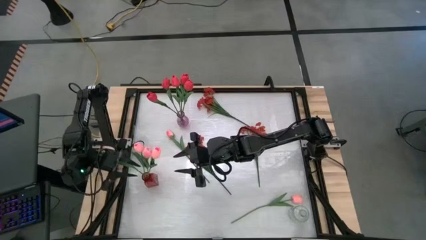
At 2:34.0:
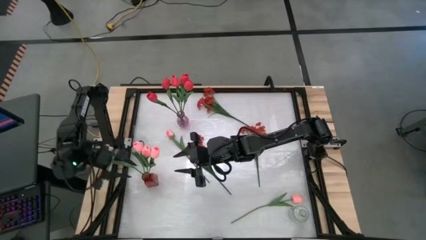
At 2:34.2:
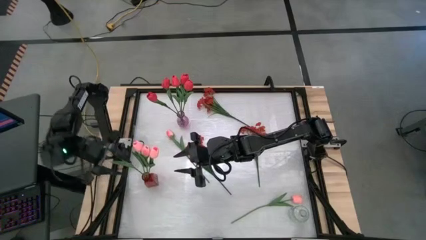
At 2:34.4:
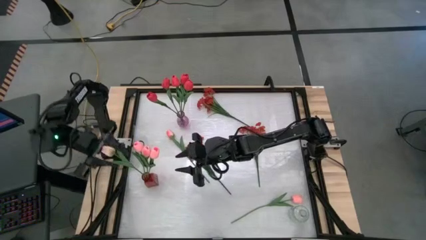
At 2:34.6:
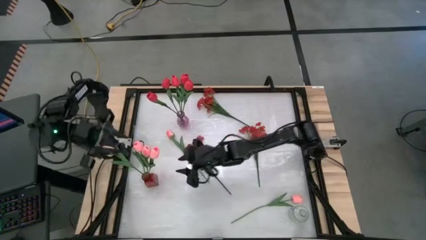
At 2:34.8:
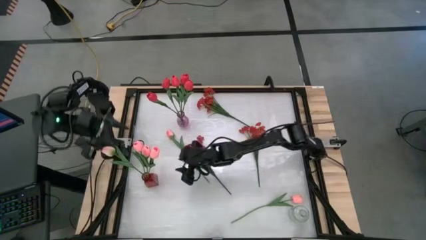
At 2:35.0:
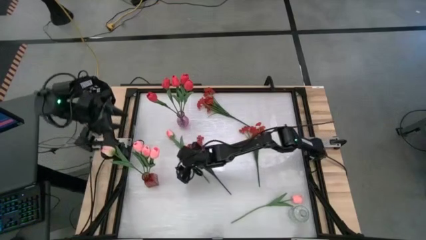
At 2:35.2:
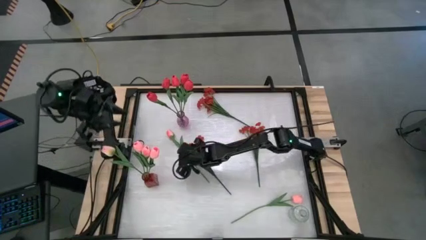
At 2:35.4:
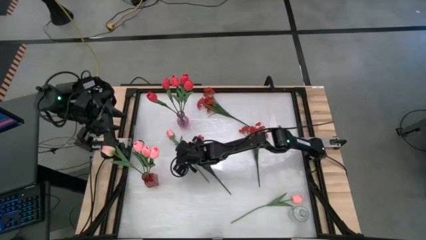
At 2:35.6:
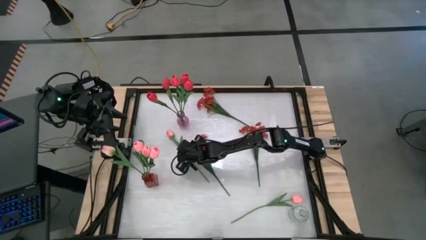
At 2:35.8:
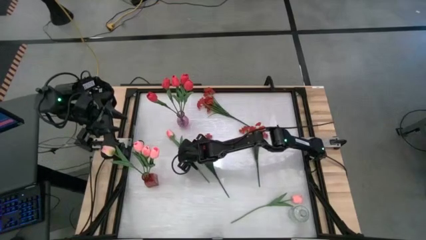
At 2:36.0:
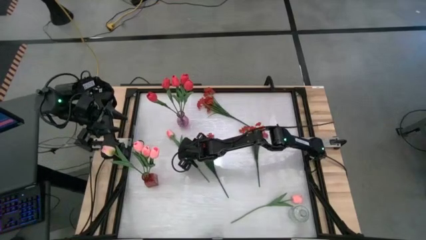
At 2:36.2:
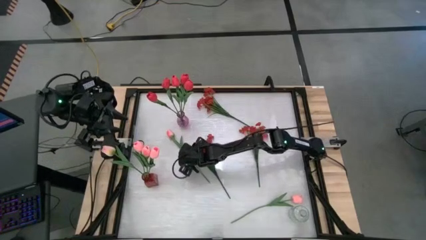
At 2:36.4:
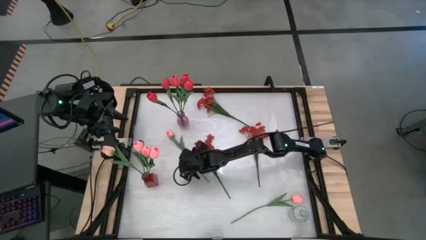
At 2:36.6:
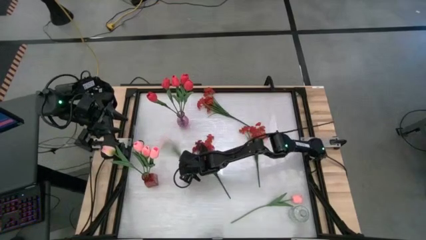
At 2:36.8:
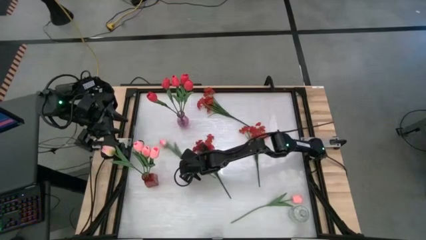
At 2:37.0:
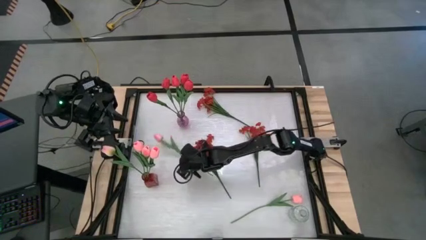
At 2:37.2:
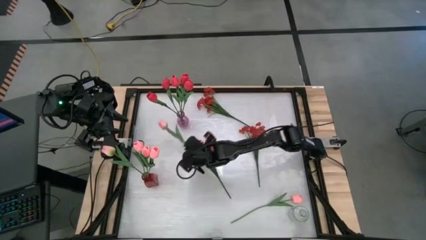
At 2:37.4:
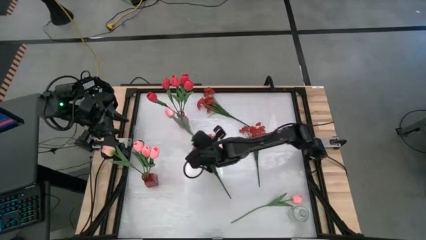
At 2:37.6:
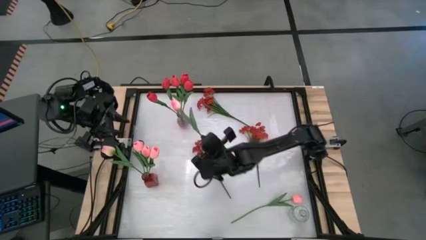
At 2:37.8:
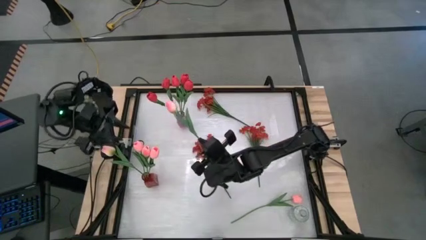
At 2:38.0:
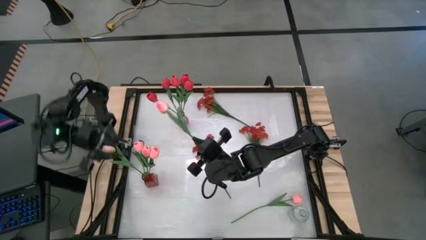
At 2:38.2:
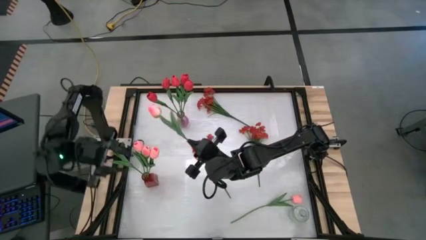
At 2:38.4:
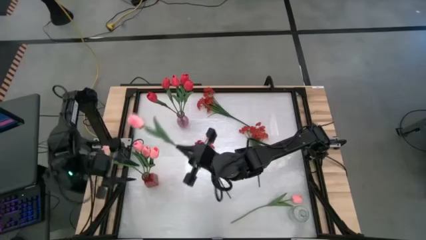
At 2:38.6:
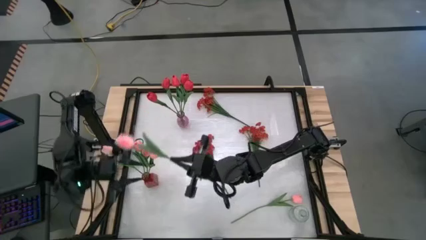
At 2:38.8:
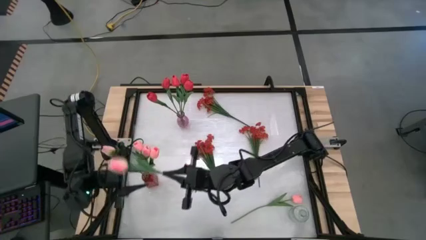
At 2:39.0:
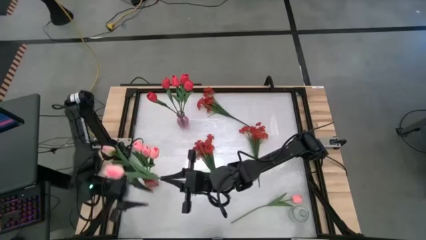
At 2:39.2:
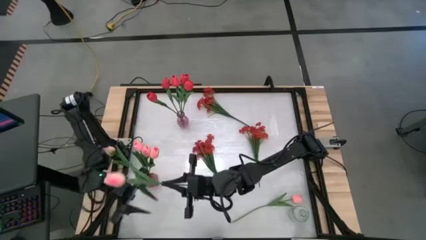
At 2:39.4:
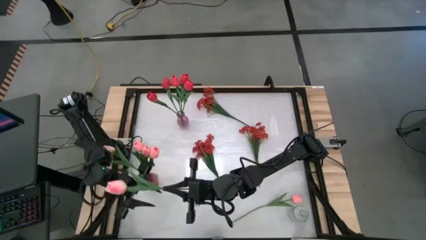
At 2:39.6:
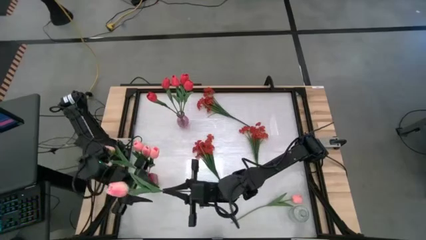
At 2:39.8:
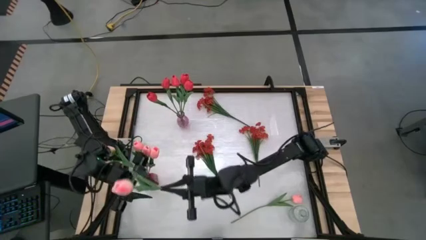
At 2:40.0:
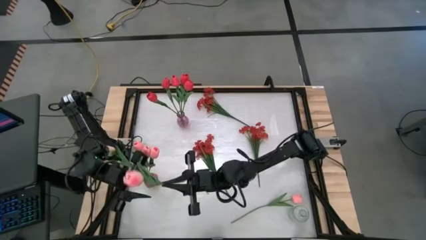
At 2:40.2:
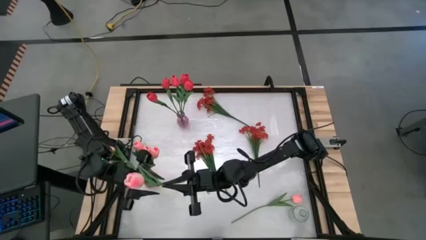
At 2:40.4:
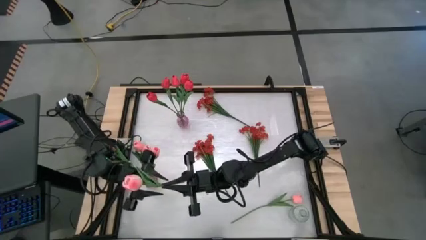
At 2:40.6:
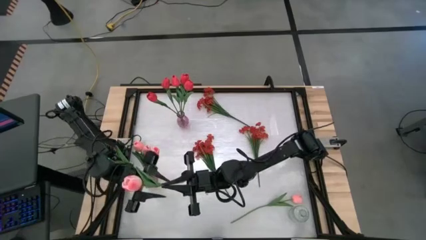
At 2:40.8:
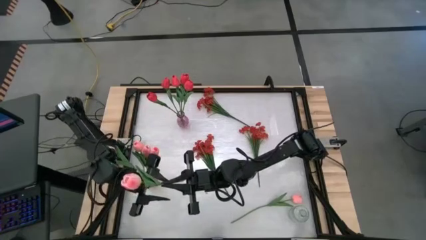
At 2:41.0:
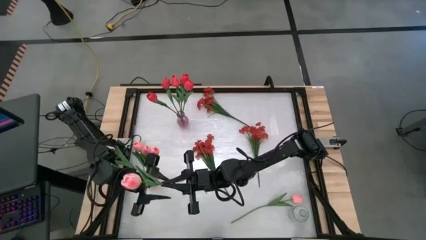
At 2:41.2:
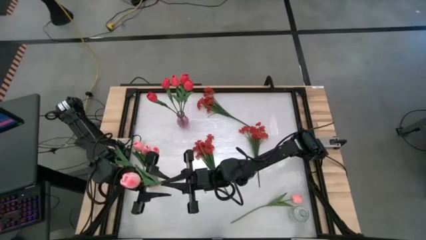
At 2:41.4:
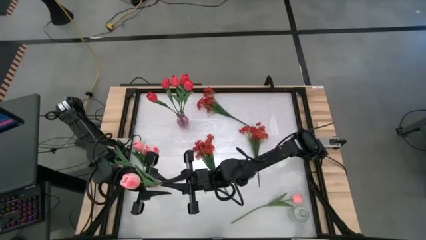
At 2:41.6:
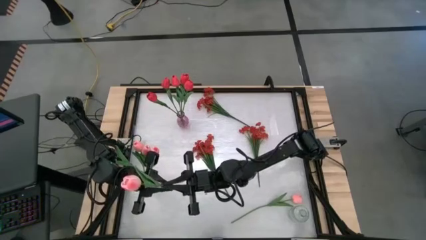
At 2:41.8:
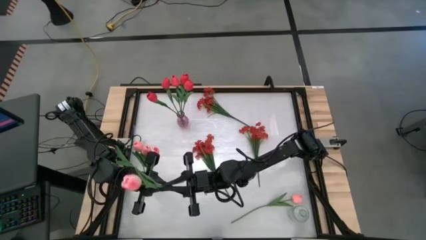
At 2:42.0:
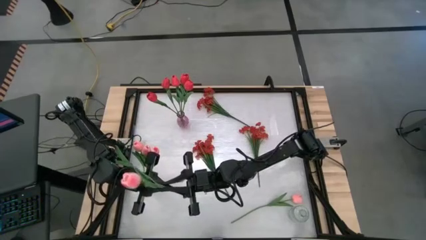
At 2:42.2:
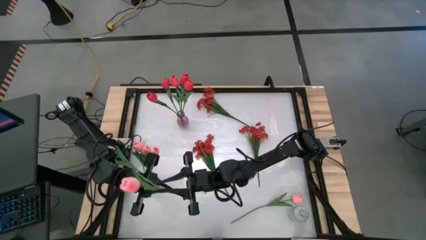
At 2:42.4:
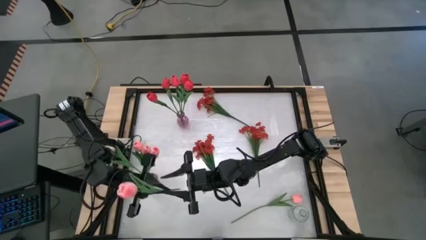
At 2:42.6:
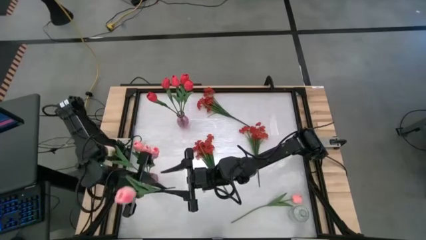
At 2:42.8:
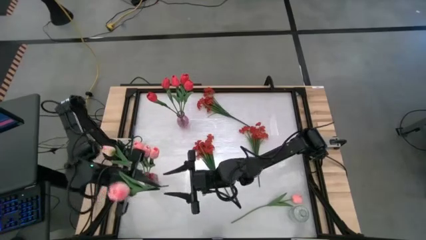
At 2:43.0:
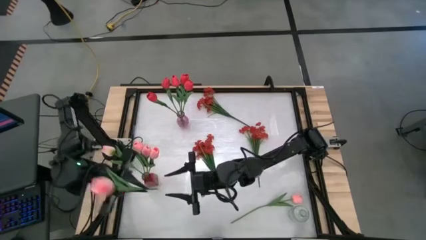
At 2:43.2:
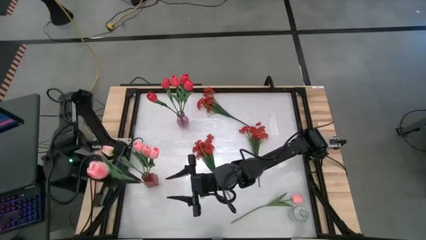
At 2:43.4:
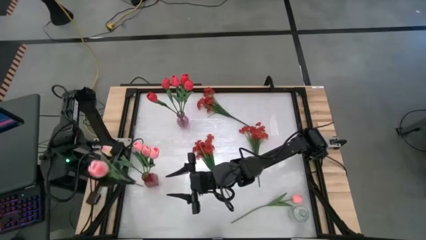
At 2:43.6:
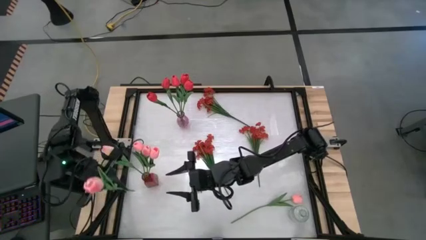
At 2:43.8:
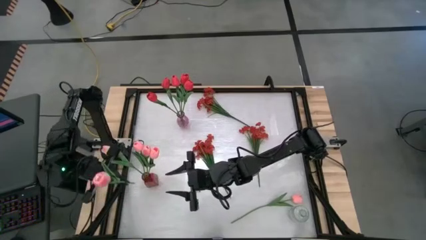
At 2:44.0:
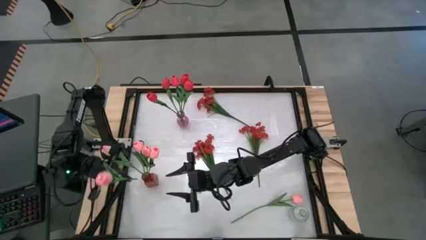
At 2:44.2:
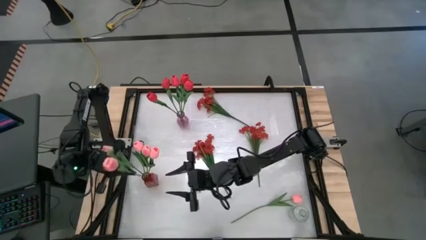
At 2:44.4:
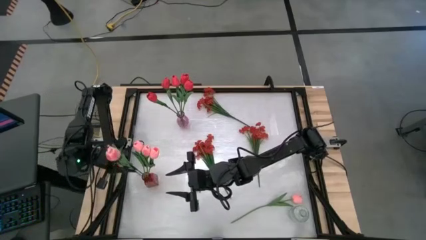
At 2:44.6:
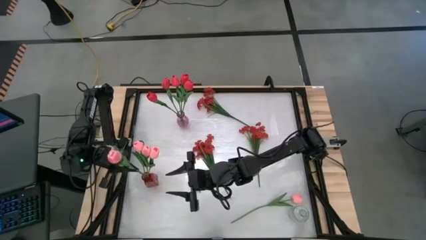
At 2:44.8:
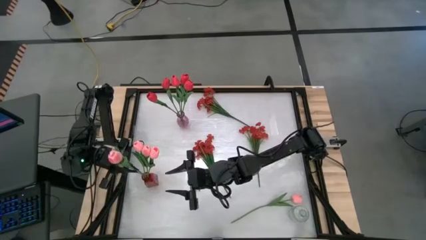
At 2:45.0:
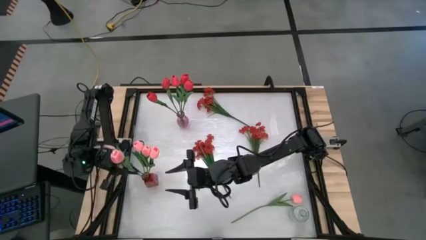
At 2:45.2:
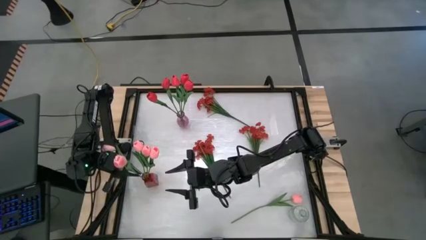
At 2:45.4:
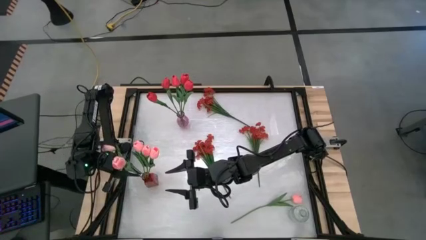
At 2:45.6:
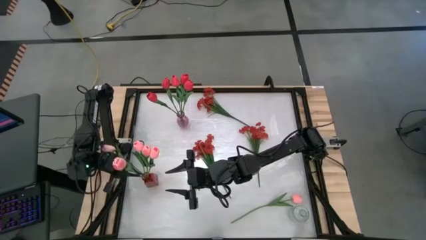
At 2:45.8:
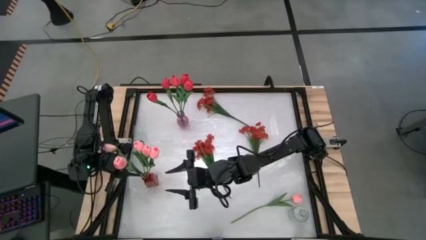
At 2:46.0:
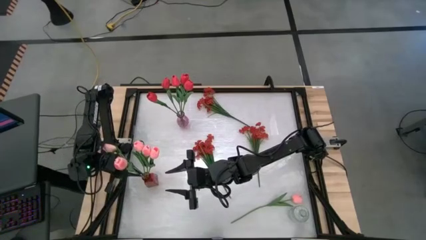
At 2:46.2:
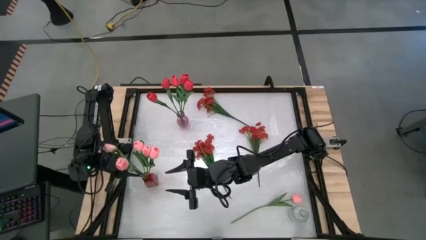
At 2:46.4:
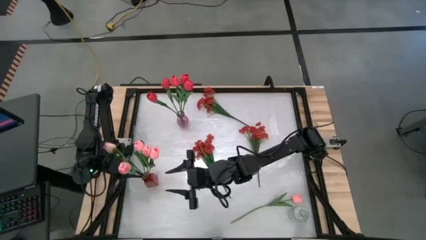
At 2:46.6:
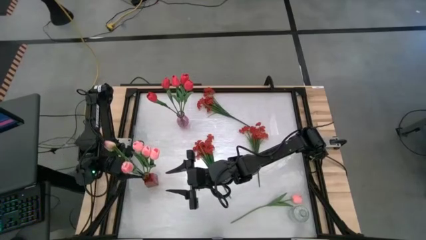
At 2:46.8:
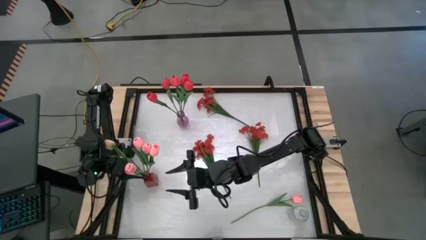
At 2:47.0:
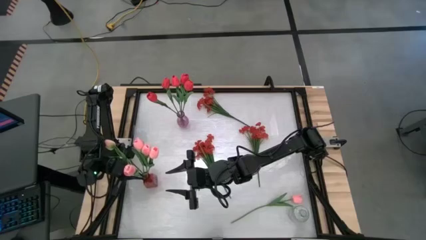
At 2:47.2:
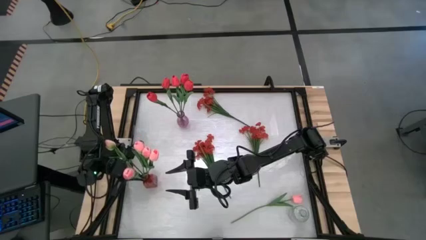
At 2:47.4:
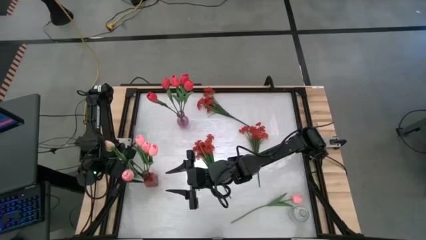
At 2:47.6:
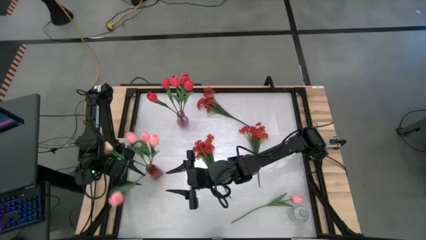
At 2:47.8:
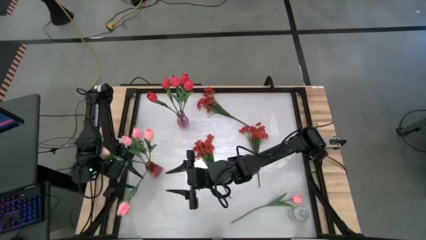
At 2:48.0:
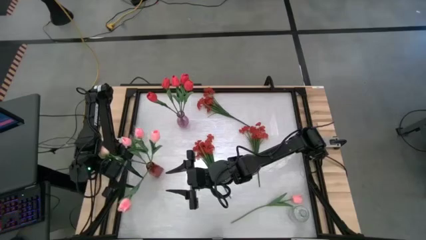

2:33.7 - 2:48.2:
Task: Sort flowers into vase by color
Put the pink tulip into the red vase
